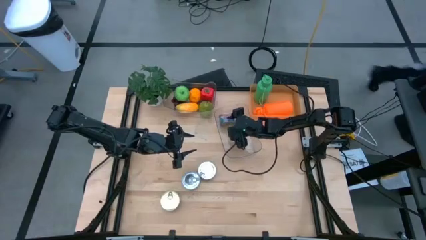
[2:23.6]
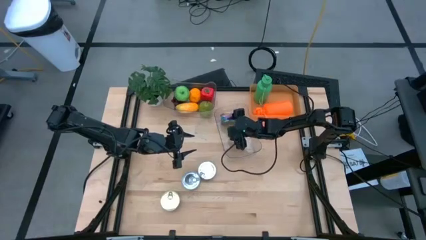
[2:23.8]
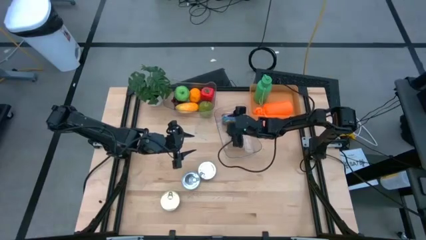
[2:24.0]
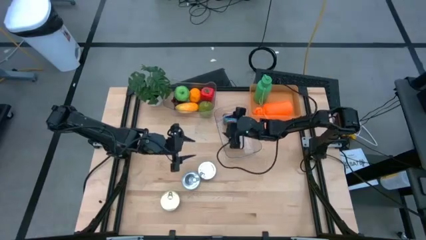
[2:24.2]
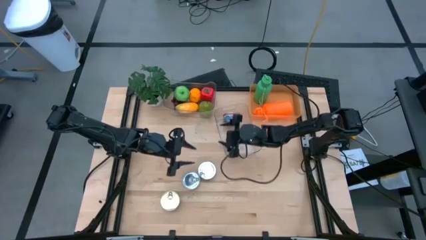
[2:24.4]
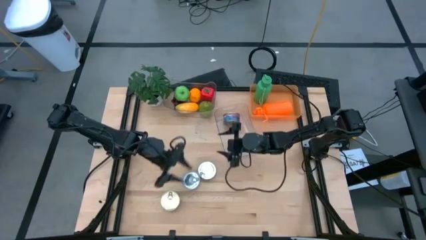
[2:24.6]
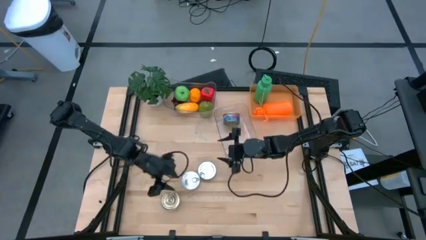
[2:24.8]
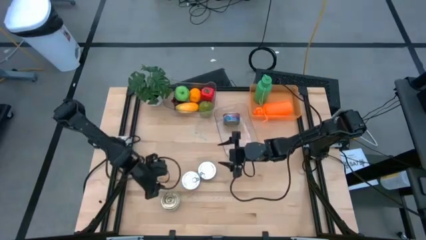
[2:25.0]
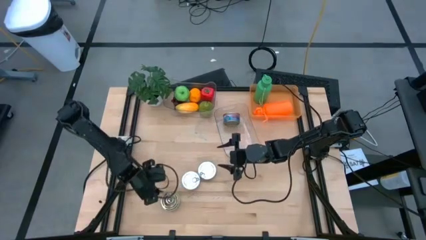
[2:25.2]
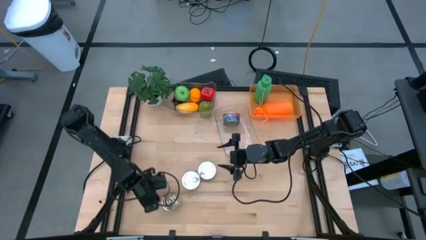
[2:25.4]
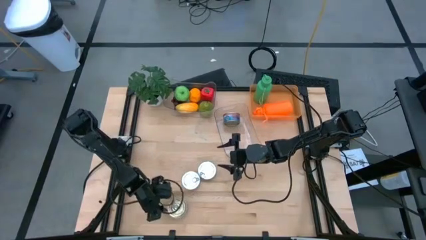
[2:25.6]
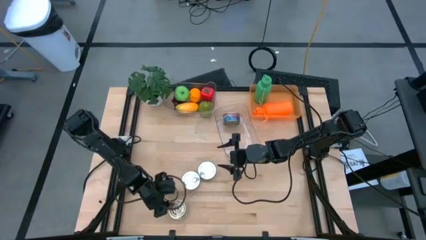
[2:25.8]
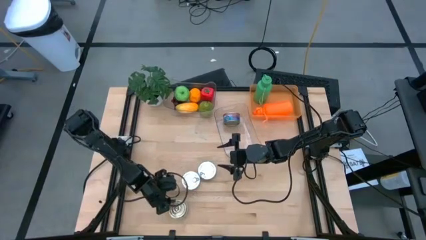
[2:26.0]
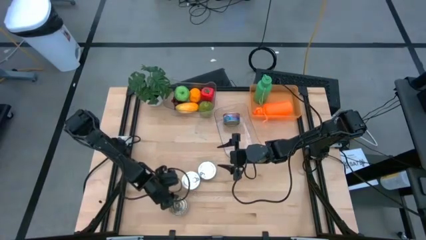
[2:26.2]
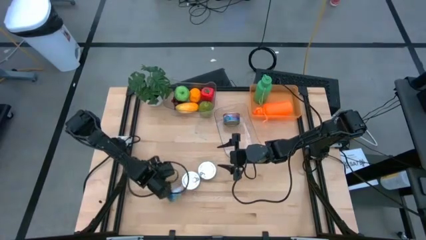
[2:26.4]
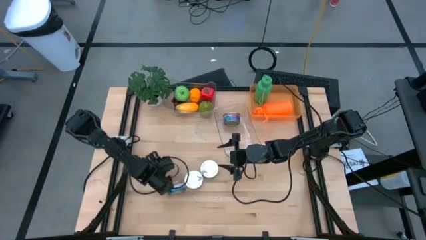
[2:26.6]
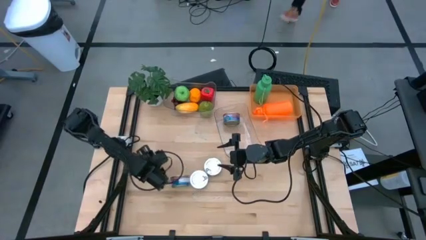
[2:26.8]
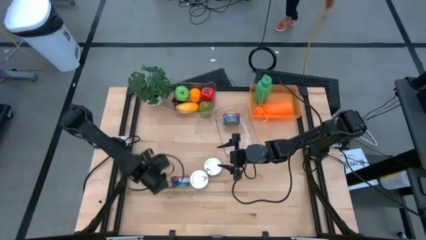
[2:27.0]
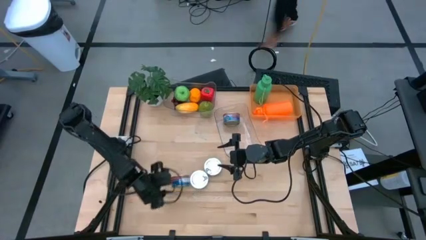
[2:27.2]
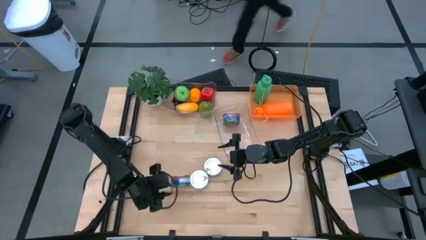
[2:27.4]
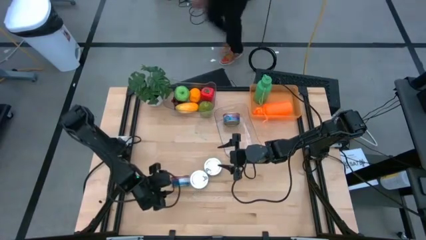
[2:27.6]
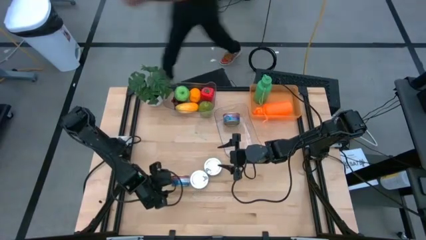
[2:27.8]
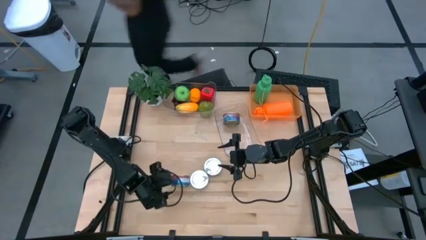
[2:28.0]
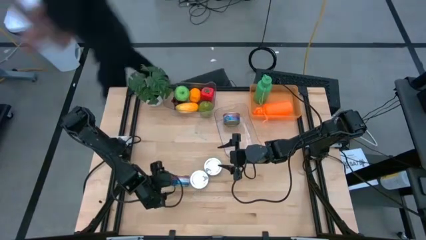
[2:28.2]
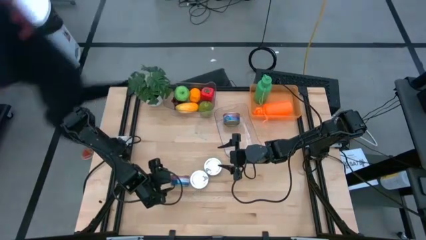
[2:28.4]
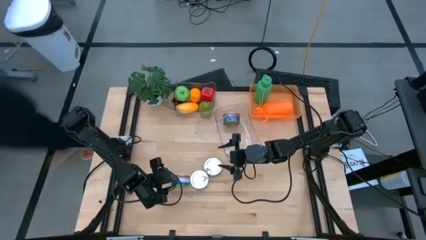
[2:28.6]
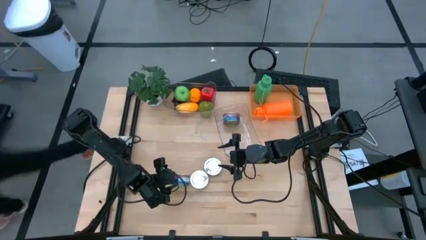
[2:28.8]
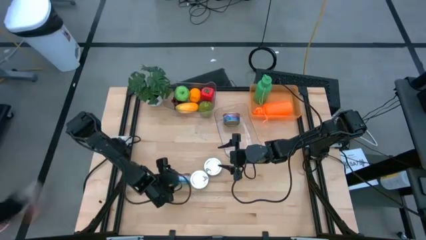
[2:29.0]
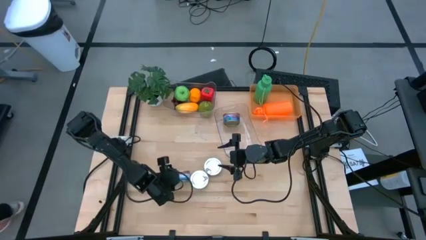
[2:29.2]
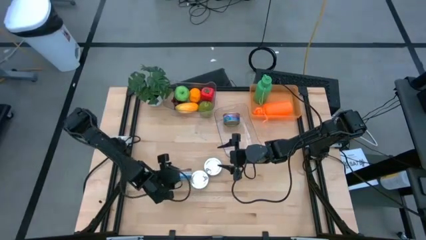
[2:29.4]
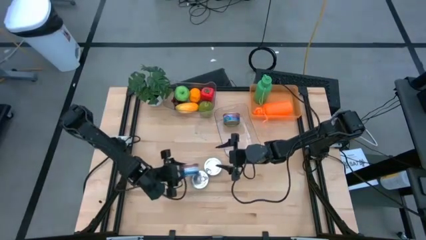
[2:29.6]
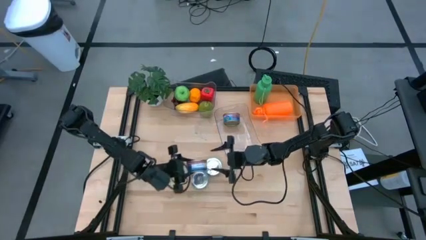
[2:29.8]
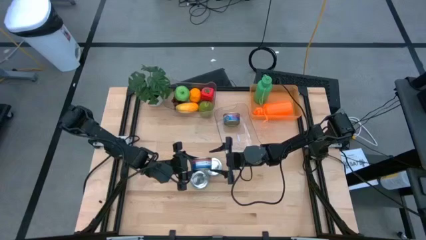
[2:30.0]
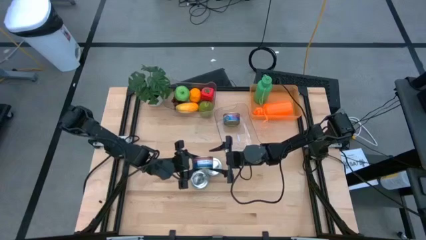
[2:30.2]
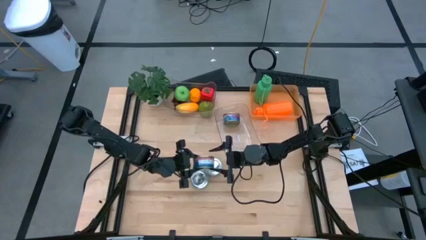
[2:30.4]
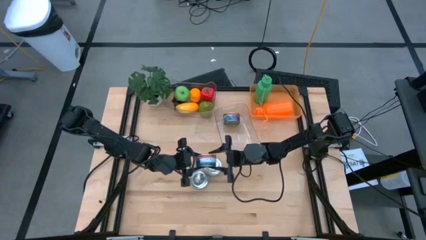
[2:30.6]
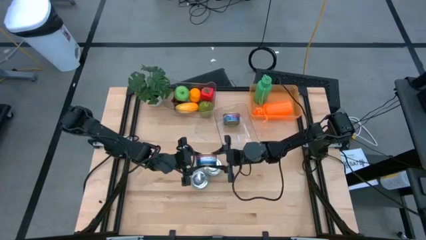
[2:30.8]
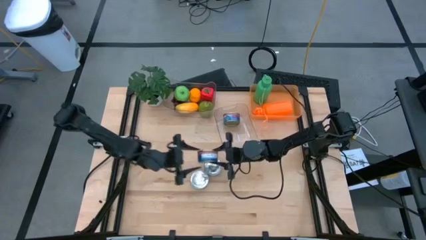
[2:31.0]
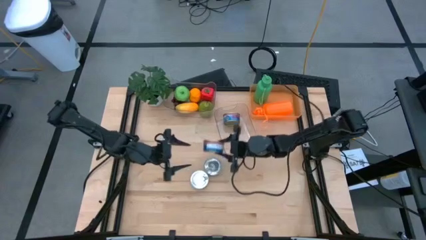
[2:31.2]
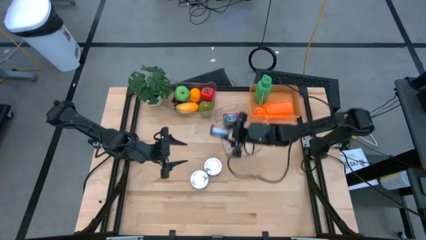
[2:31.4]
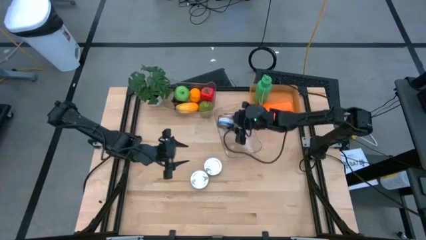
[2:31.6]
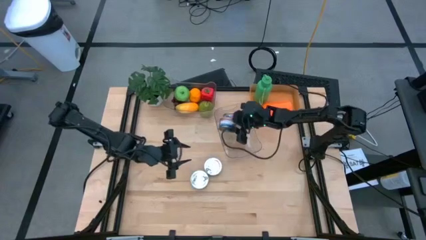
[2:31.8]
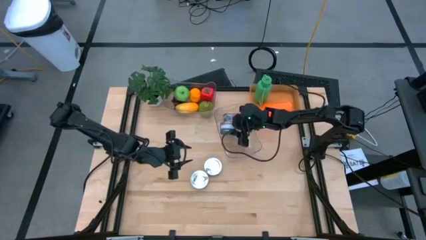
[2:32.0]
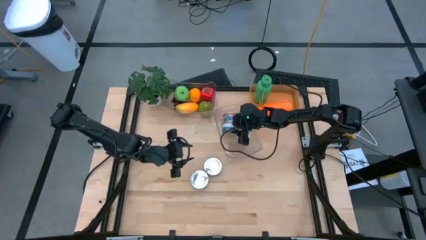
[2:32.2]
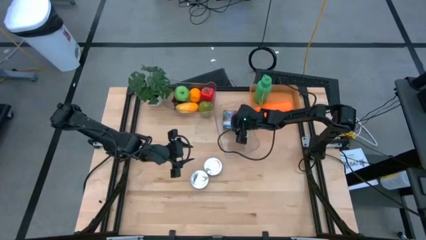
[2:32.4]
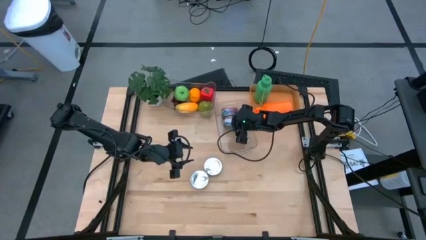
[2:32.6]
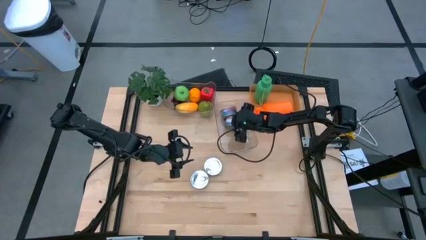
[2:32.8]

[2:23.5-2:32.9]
Task: Pick & Place Food Item
Put the blue tuna can into the bottom transparent bin

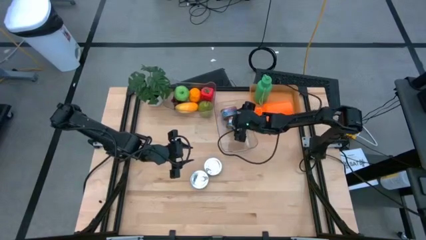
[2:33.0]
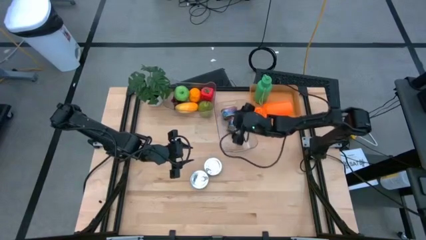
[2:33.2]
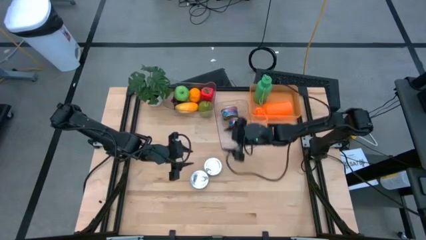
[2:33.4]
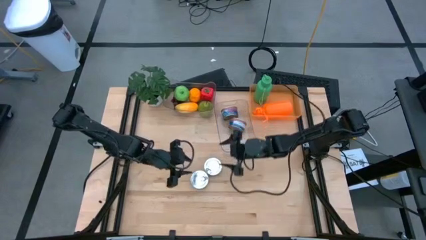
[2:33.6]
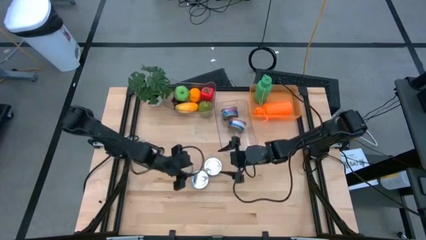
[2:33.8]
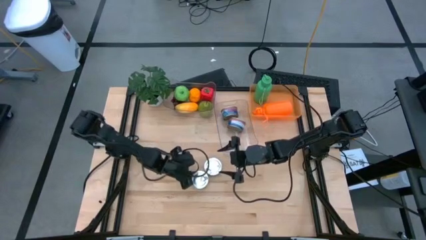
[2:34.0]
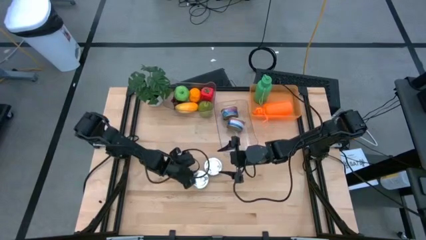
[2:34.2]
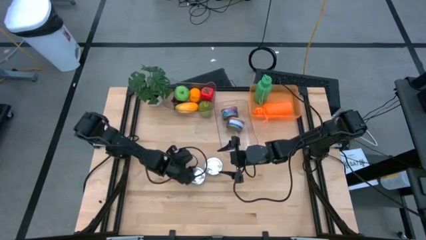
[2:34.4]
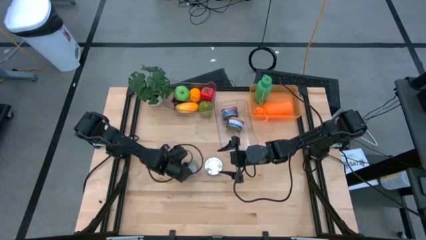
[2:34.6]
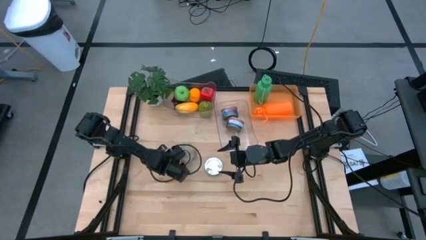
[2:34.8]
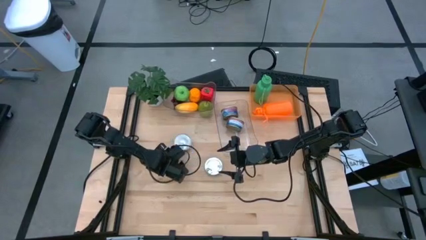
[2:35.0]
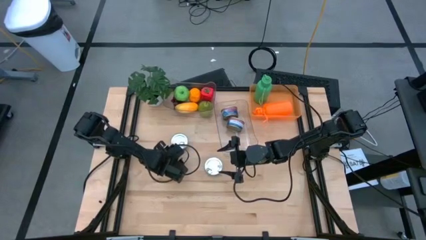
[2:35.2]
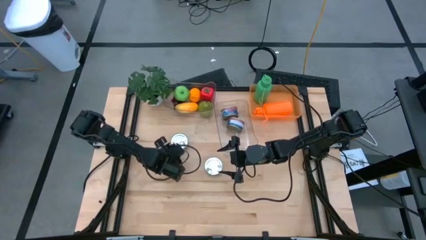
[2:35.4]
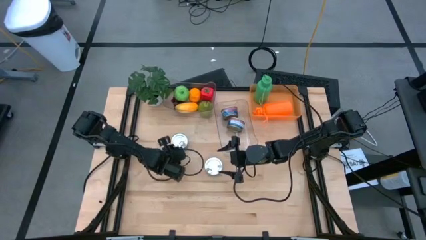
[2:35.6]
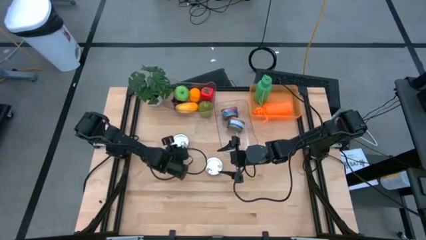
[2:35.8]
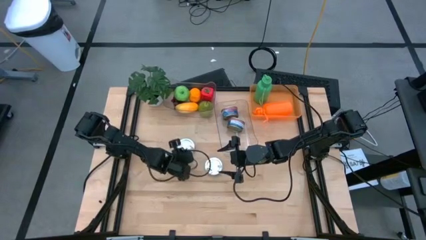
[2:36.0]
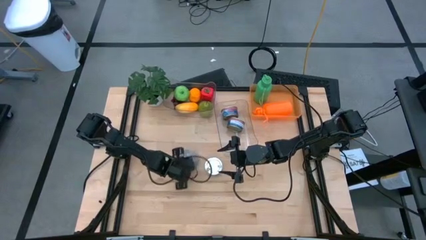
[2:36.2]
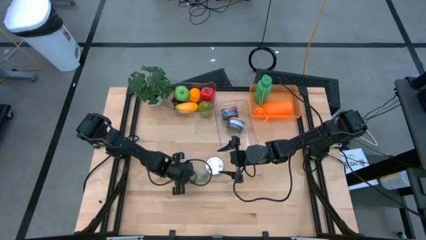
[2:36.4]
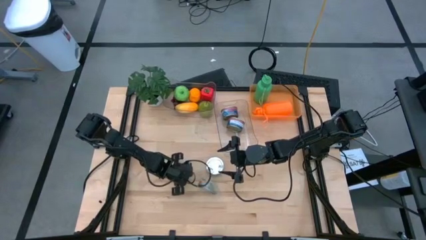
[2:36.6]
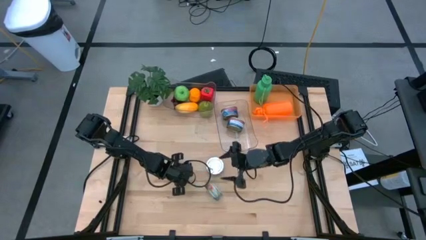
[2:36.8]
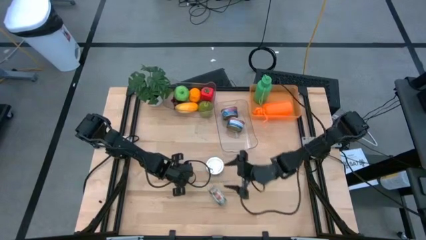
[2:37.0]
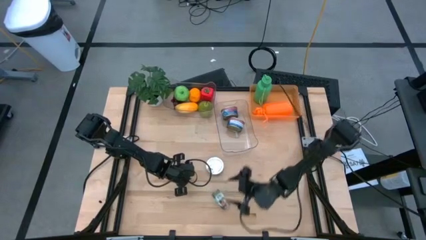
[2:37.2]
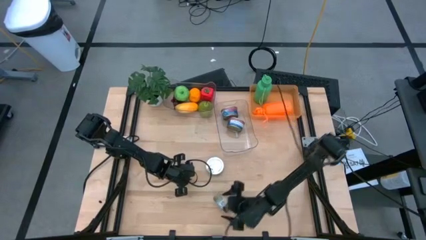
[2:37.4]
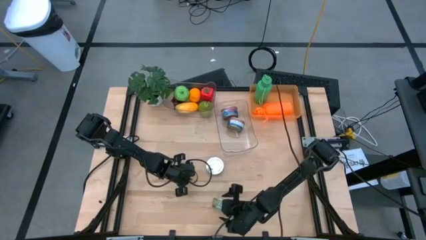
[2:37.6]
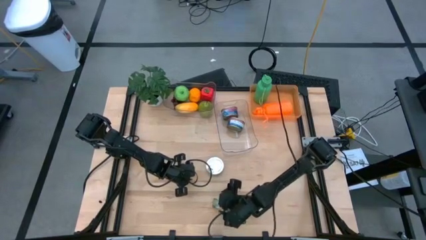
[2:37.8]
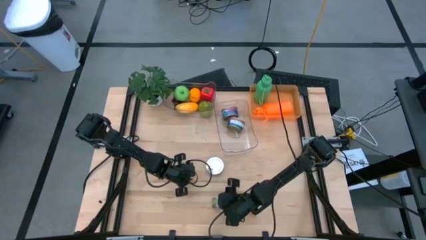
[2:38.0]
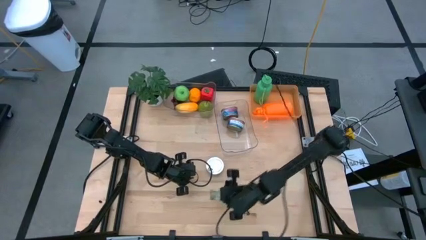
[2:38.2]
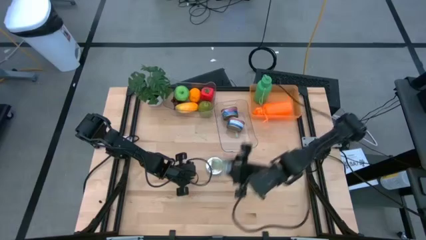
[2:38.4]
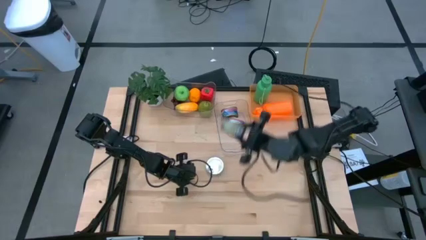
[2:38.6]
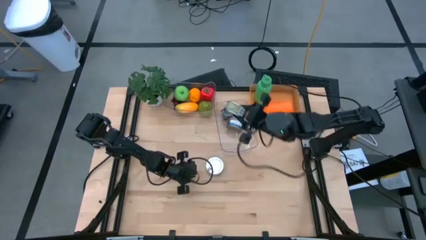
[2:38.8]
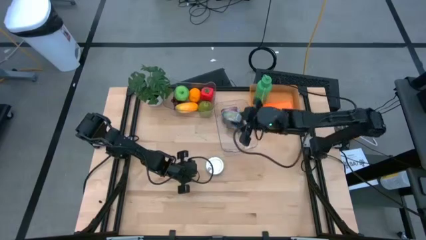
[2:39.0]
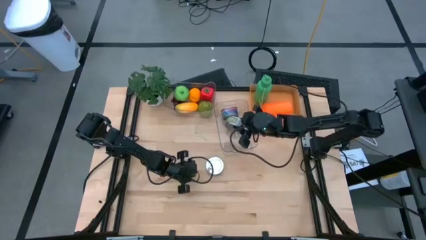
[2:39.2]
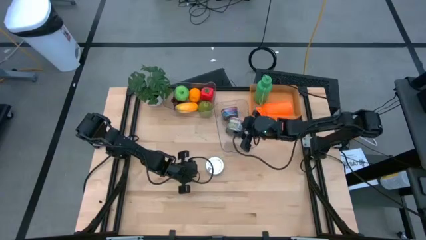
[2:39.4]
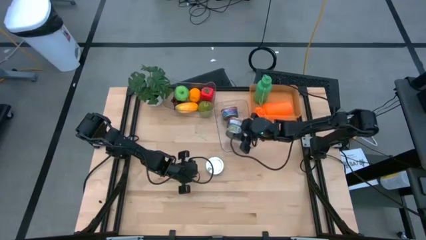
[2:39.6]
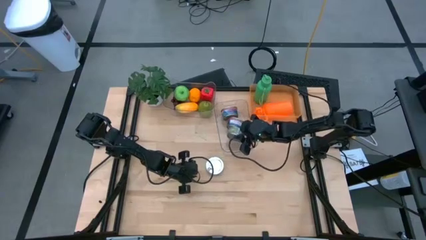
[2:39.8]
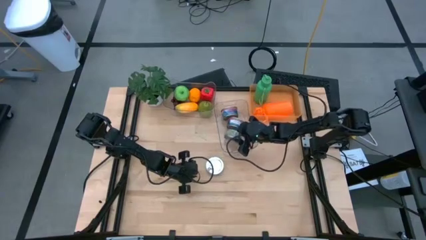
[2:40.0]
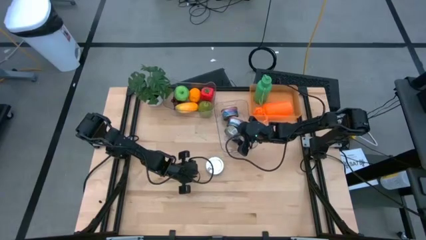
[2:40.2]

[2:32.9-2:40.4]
Put the bottom green tuna can into the bottom transparent bin
